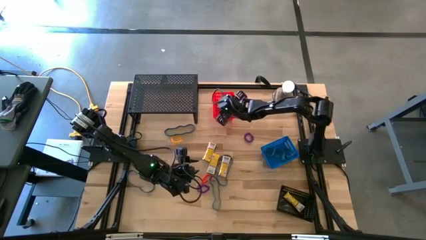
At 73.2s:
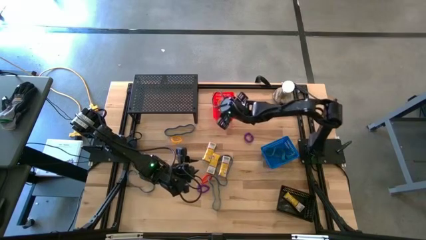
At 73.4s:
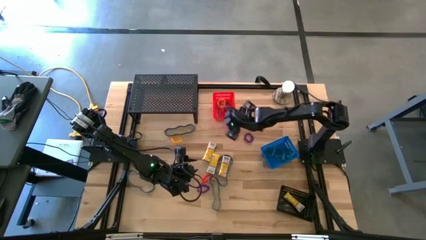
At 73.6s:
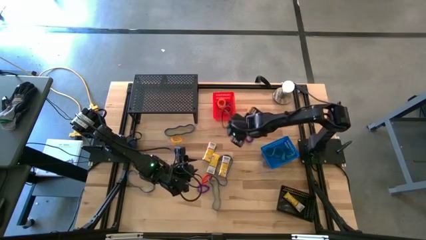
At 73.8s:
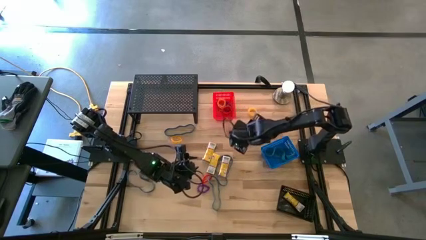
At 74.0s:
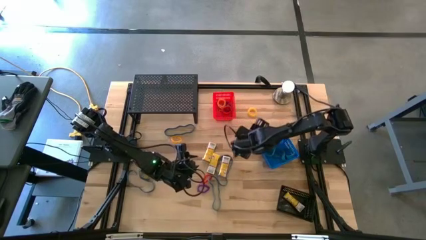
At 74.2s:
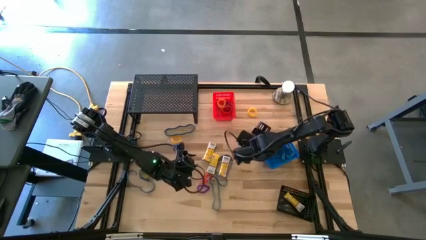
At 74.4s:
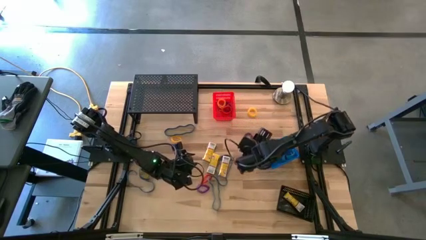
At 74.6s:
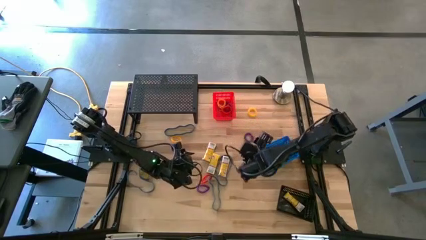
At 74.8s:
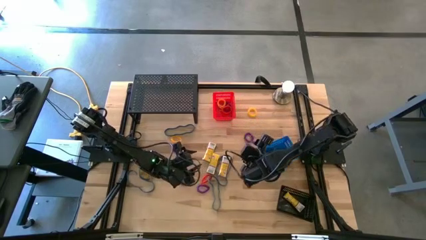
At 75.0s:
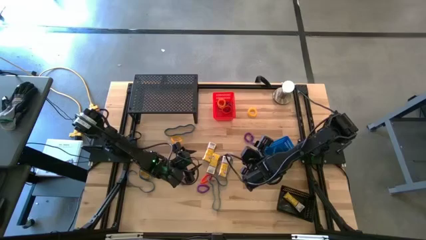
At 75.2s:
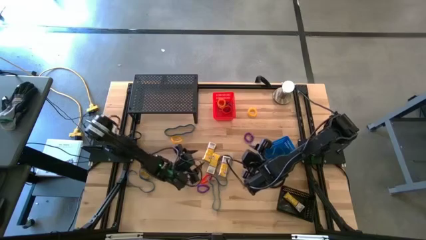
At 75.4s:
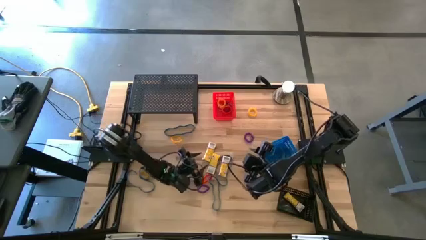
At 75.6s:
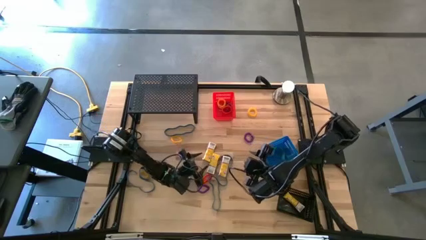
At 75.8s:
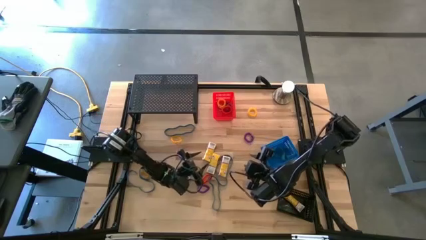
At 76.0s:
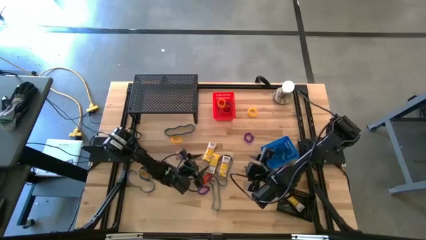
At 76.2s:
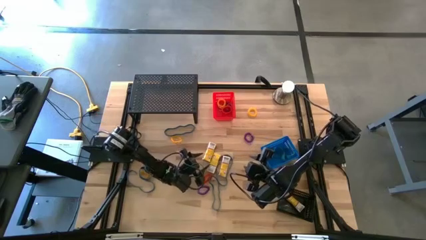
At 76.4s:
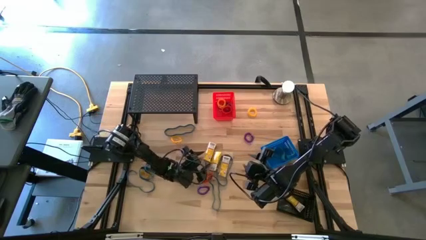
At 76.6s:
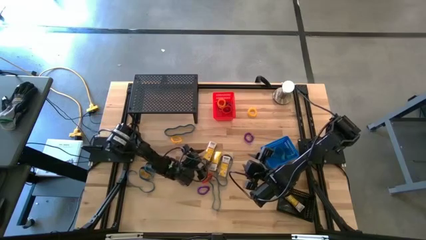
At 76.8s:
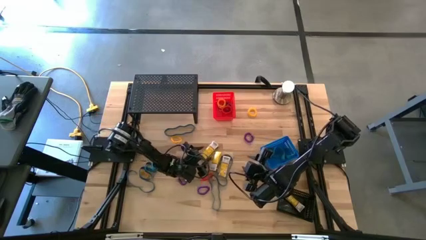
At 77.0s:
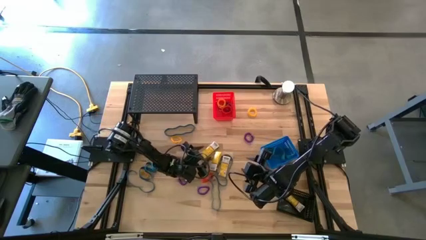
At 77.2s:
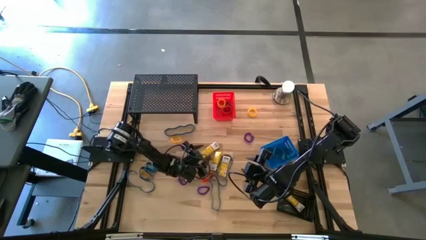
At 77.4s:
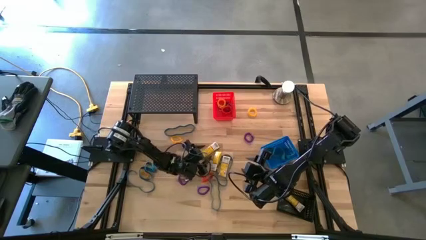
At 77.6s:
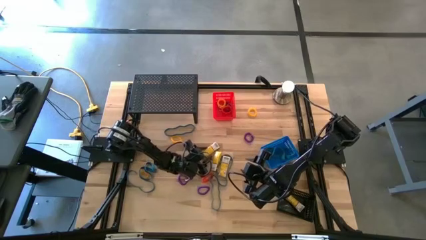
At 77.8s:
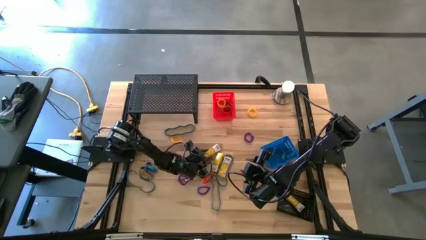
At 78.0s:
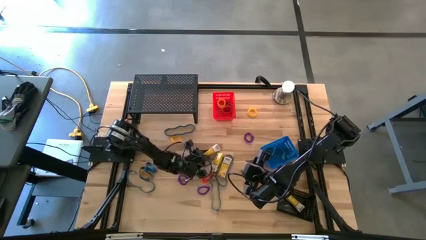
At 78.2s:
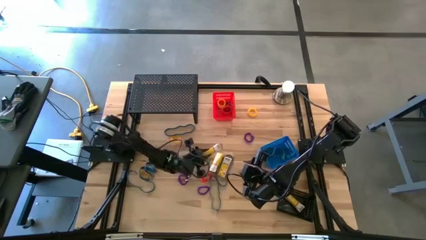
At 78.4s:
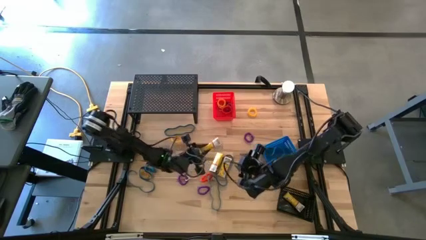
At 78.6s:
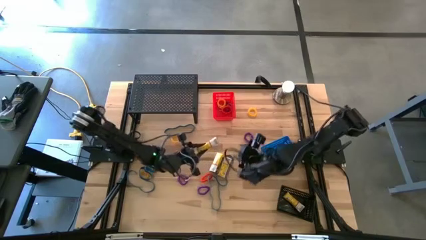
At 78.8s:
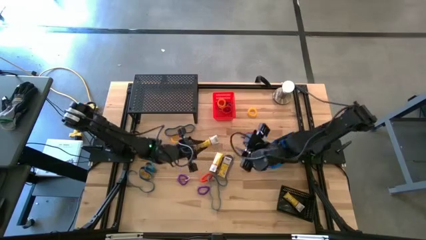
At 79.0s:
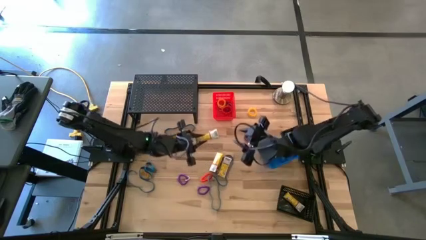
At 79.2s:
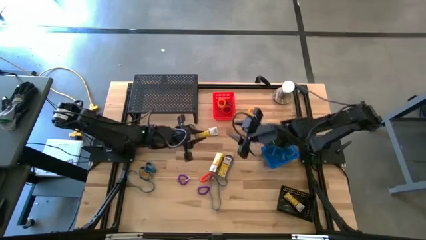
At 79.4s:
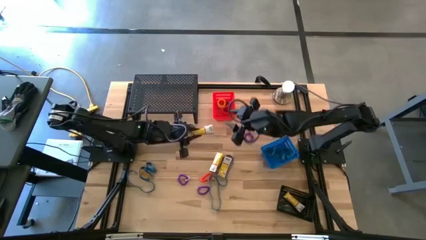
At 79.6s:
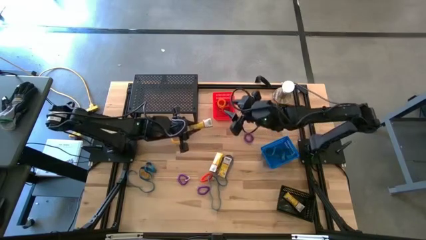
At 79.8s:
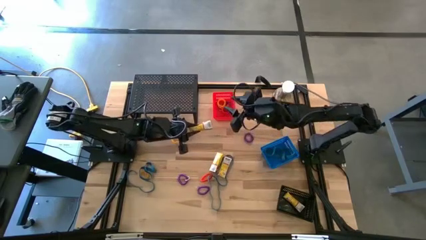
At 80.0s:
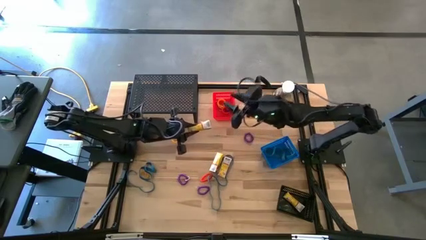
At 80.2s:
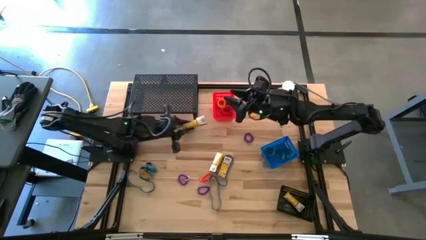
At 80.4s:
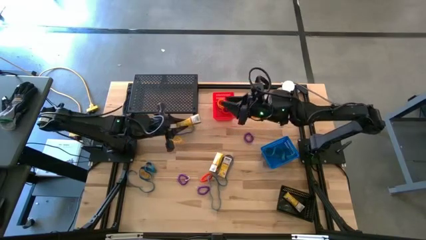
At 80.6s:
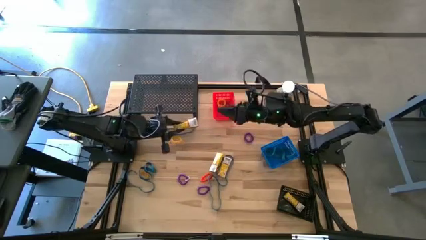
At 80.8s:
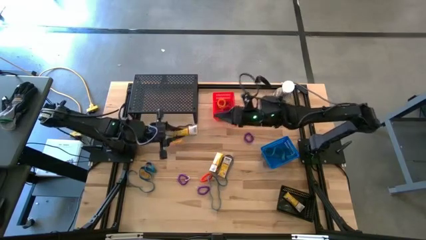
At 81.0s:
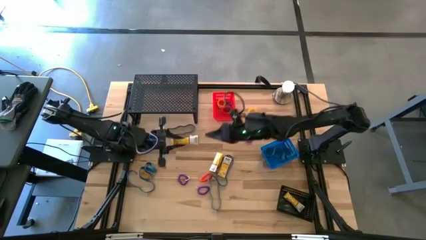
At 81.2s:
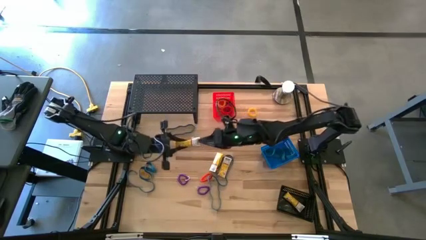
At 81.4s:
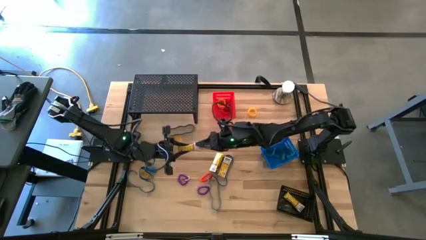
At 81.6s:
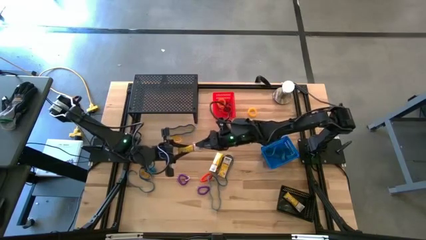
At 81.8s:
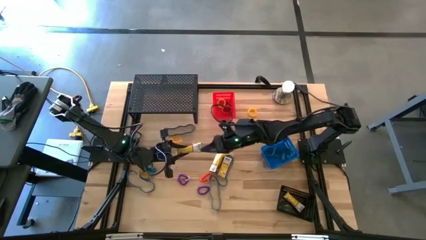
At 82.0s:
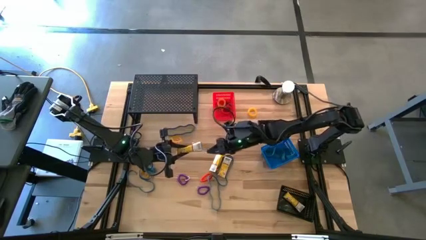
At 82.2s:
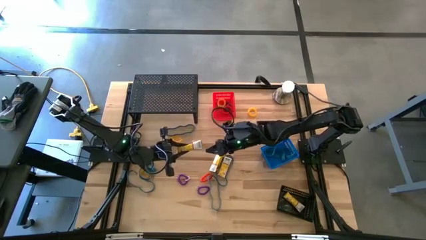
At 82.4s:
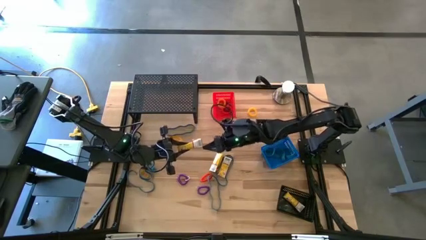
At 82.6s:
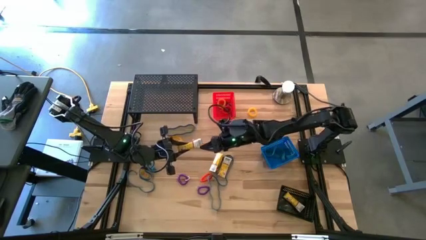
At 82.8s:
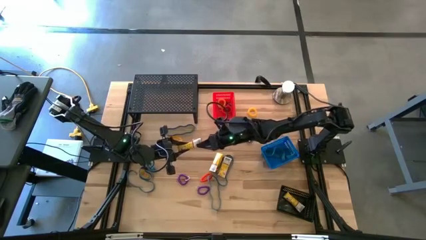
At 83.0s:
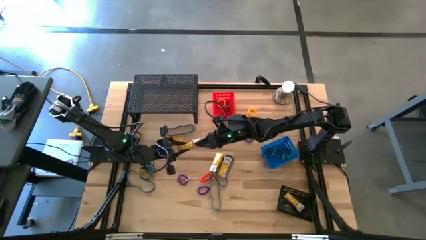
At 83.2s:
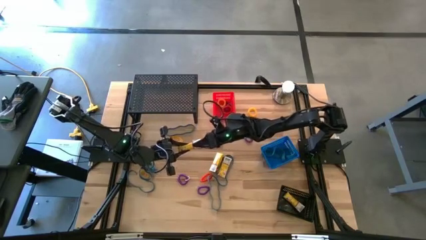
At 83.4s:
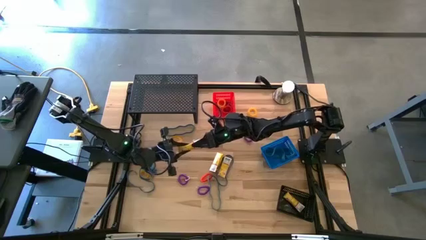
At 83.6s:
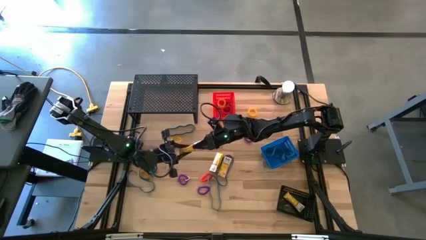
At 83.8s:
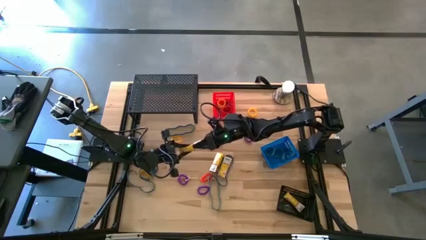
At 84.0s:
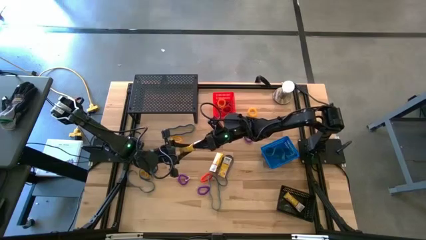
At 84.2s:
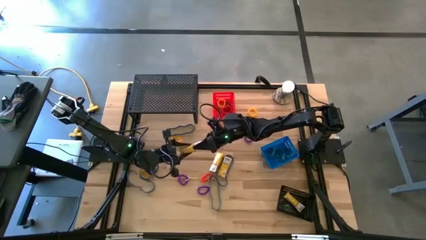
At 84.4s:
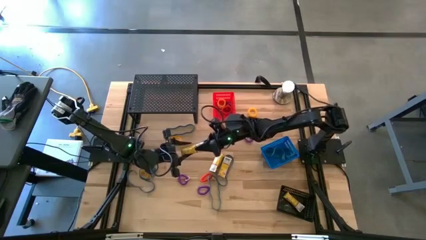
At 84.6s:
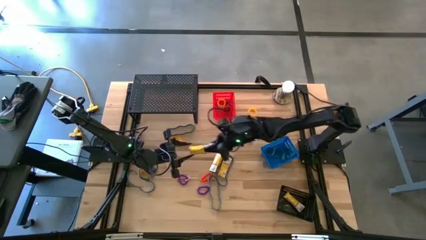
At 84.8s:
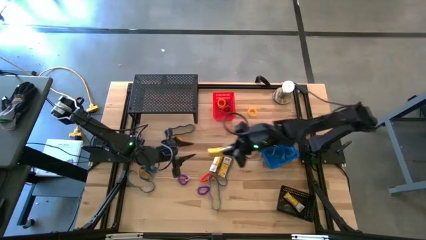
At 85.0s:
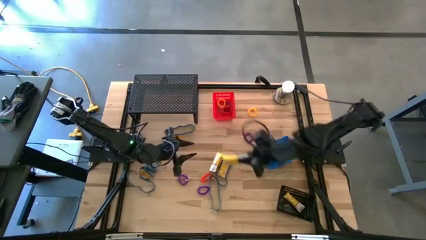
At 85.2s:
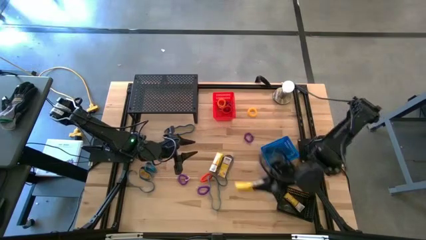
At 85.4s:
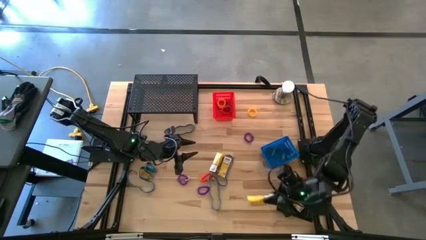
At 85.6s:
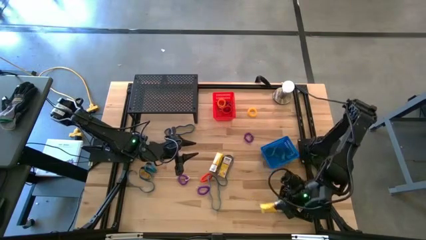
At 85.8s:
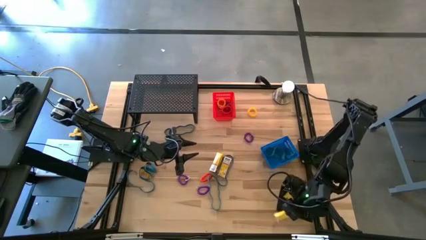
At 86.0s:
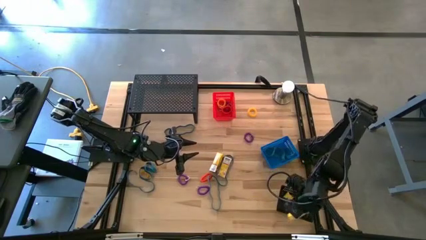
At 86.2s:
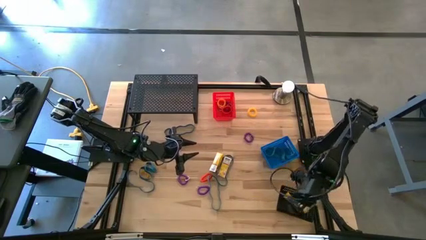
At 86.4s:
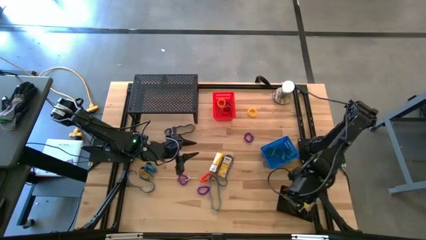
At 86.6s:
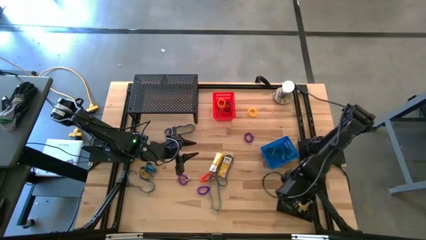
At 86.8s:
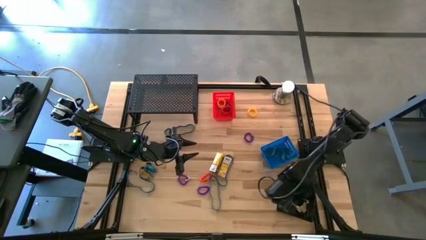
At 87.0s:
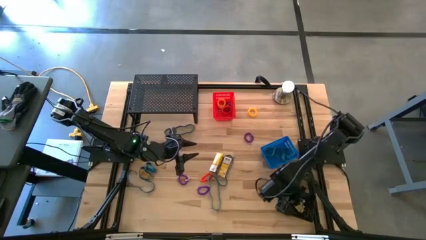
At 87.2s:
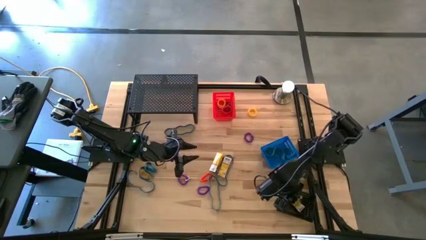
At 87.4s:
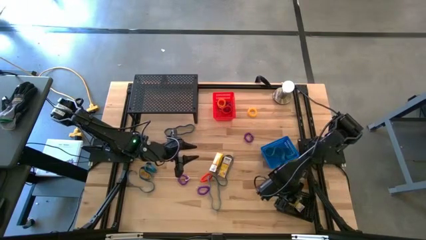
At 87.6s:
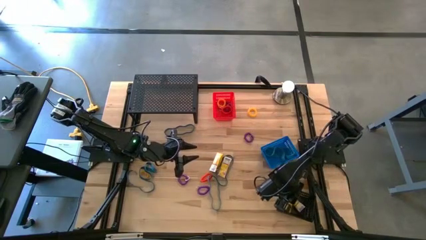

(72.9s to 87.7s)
Task: Pick & Place Office Desk Supplies
Put the crayon box into the black bin

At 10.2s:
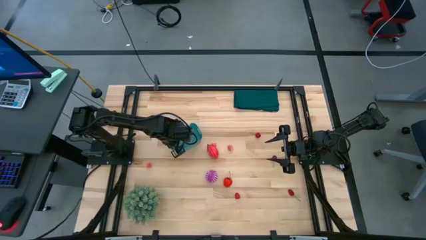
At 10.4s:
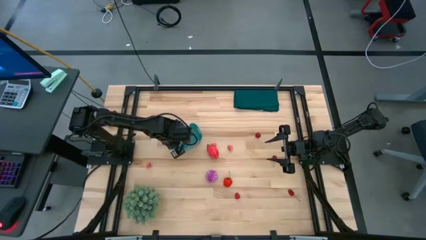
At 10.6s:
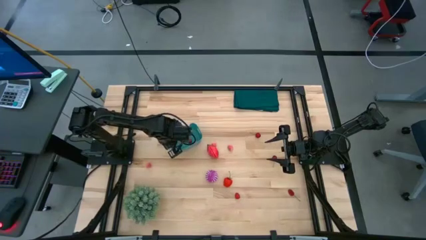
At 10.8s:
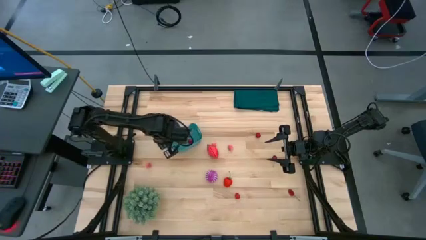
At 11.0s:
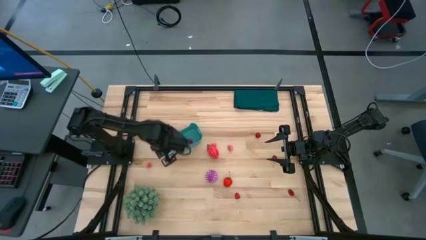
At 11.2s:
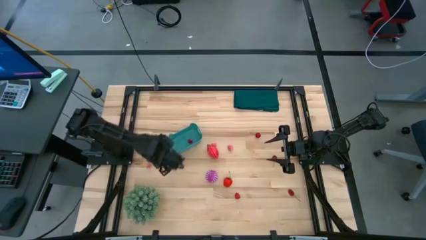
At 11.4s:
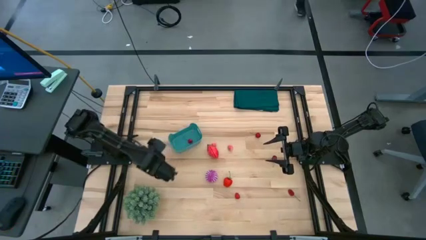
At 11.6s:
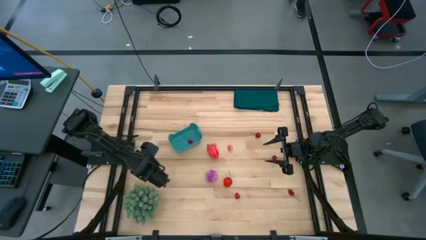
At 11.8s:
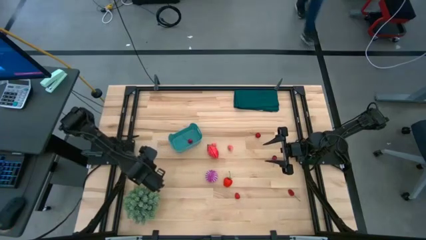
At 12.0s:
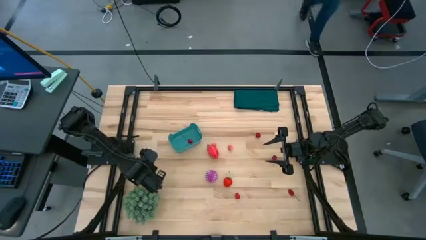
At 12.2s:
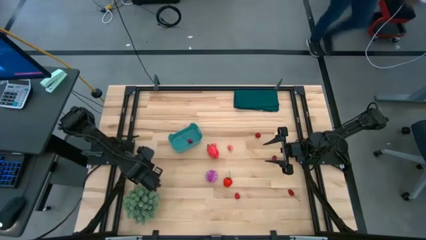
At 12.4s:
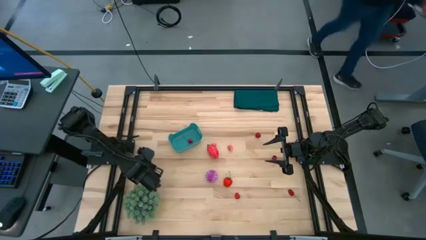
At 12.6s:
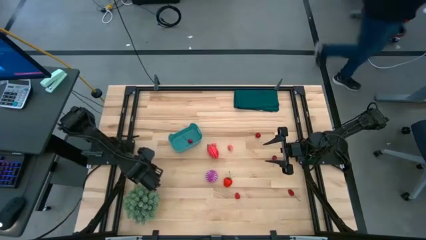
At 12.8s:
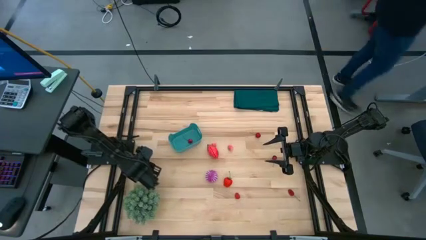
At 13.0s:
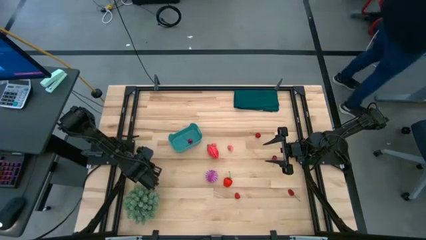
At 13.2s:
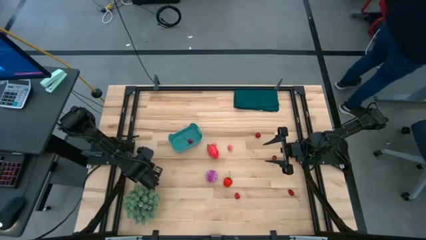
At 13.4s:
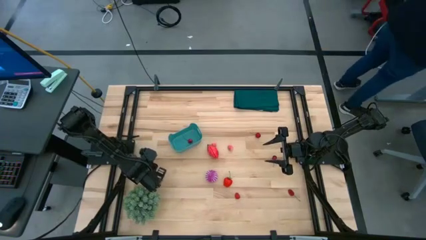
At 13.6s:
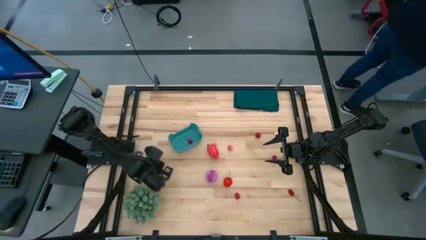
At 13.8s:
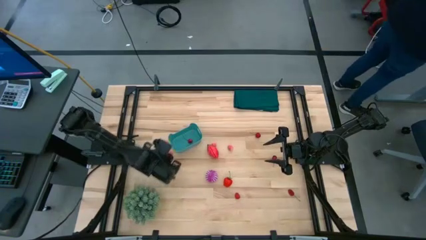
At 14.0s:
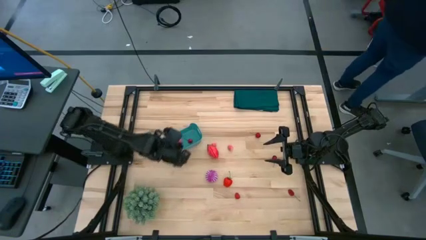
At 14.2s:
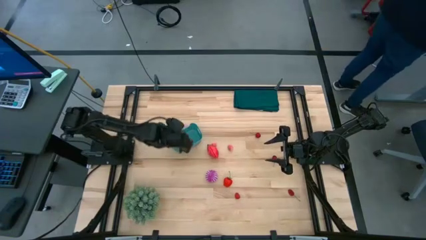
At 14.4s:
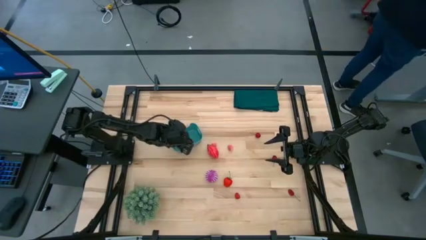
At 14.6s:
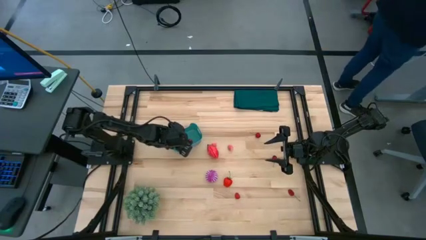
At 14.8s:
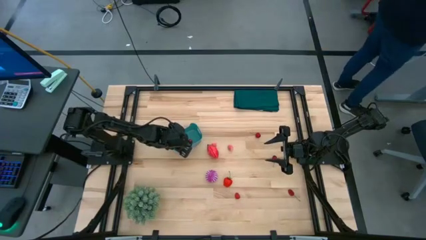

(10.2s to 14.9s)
Task: Pick and placing Produce into tupperware
Put the pink peach into the blue bin
